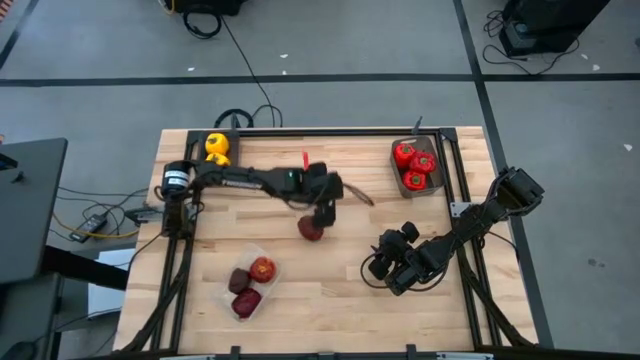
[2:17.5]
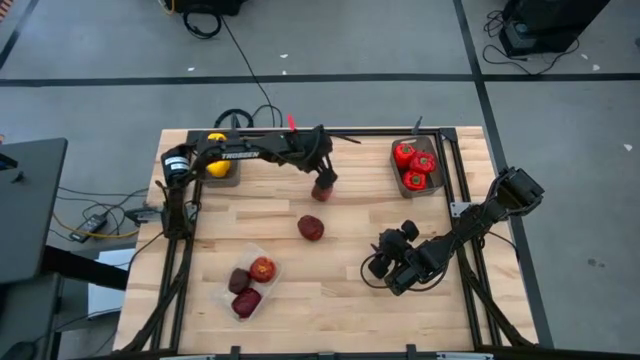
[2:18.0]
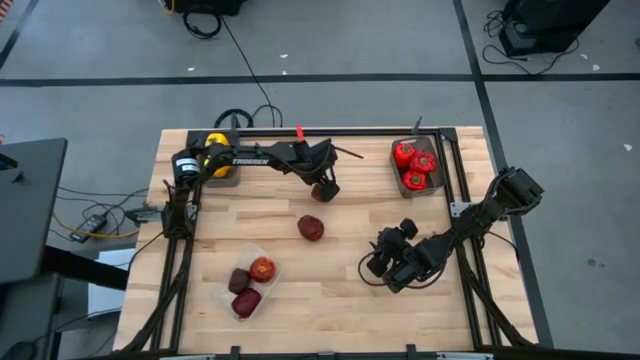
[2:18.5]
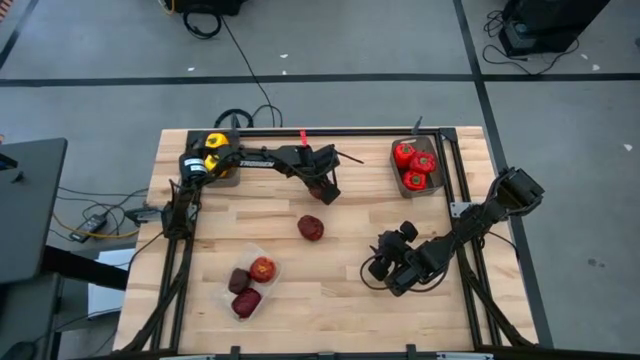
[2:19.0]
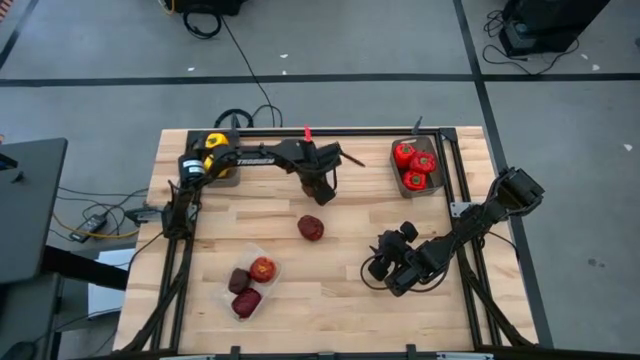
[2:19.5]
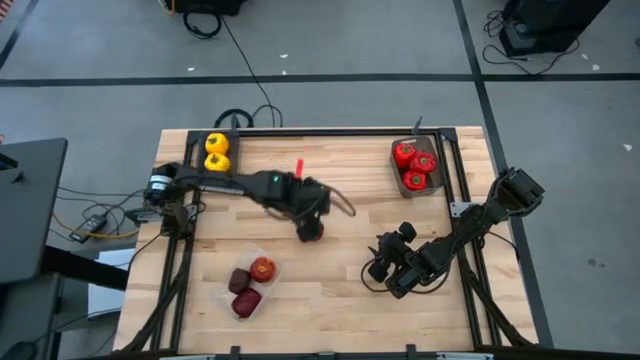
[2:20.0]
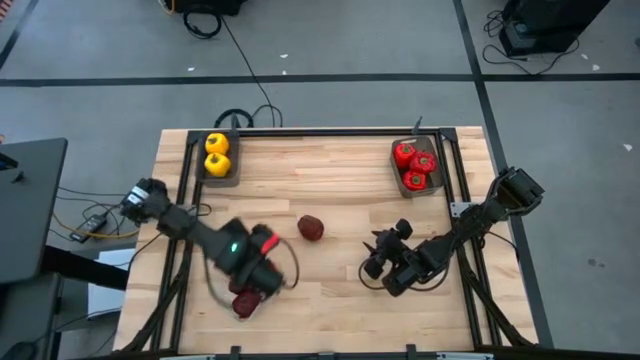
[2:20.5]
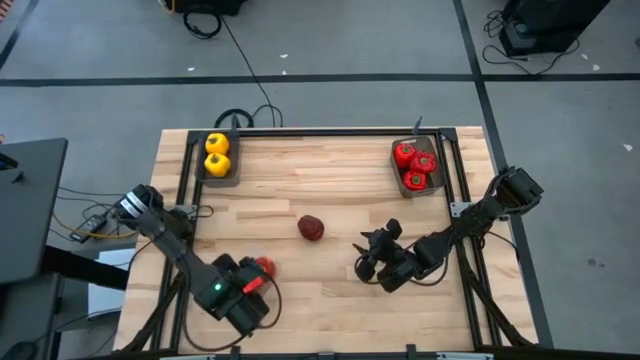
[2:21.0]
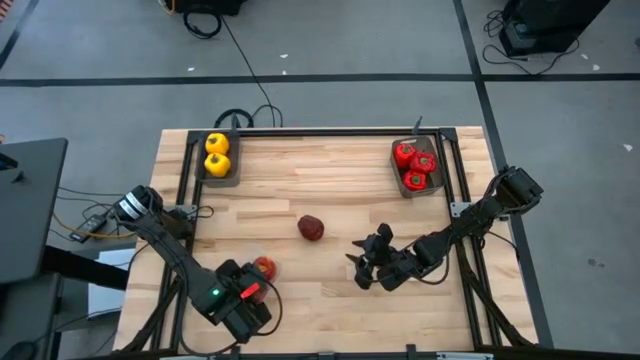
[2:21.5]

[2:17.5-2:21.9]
Task: Sort produce into baskets
Put the red apple into the transparent bin

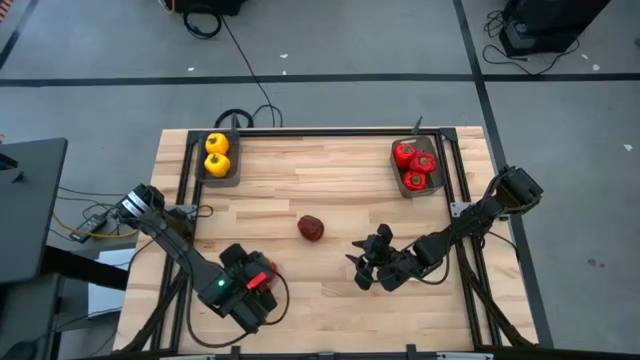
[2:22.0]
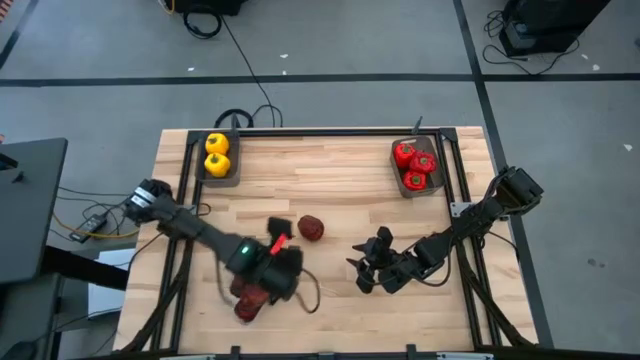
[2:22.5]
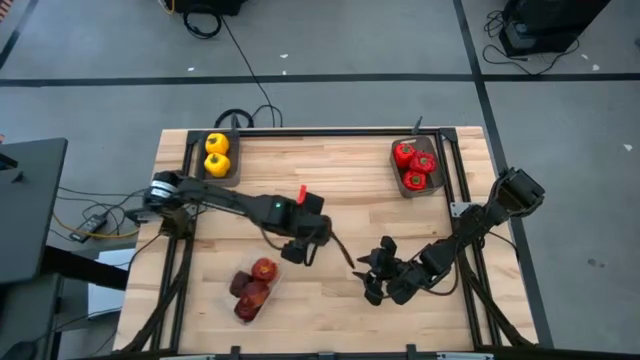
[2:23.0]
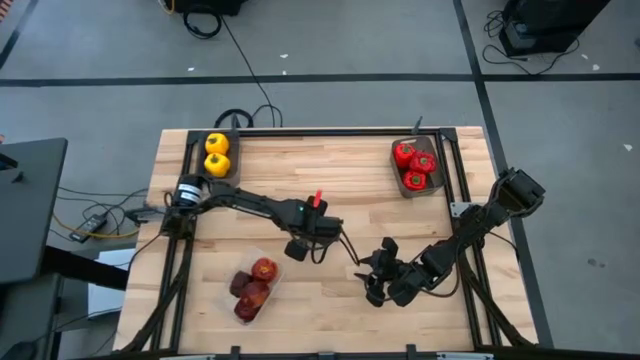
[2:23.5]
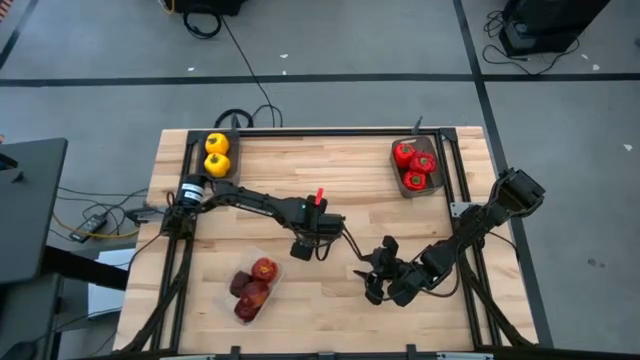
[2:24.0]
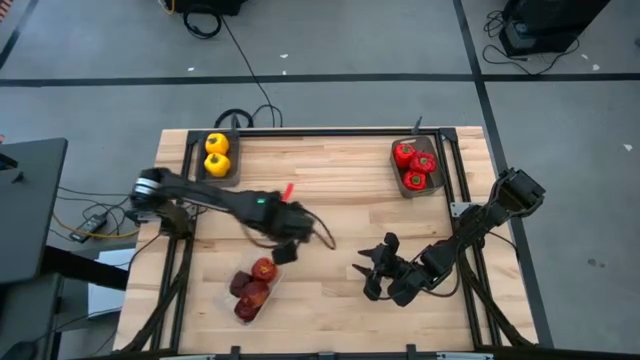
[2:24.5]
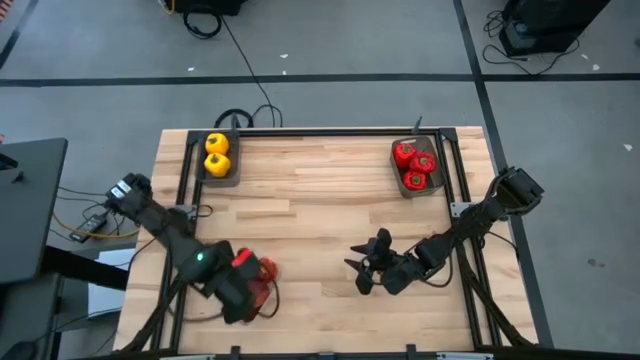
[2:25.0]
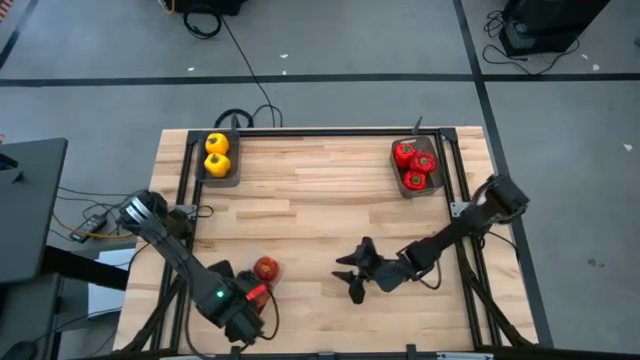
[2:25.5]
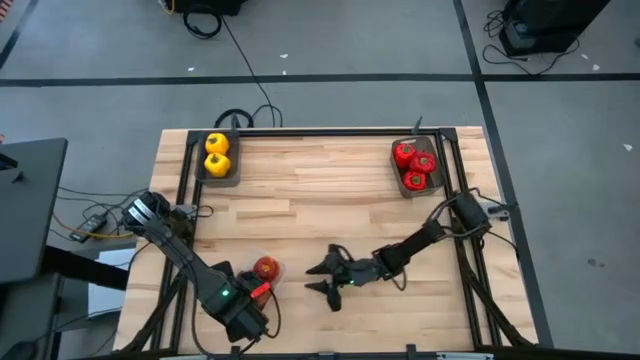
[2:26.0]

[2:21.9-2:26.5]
Put the red apple into the transparent bin

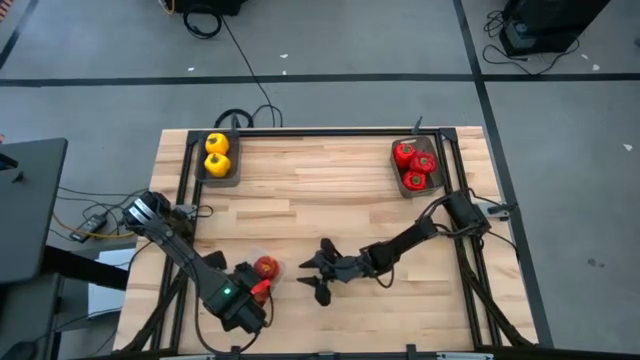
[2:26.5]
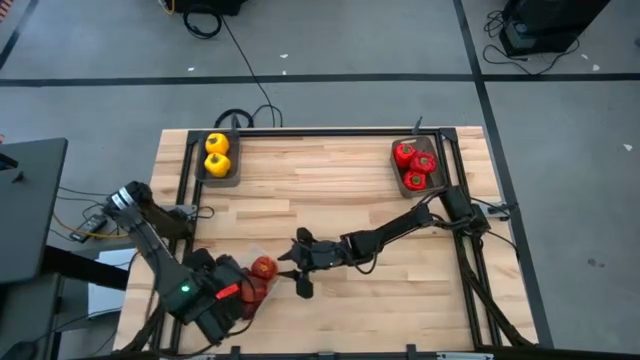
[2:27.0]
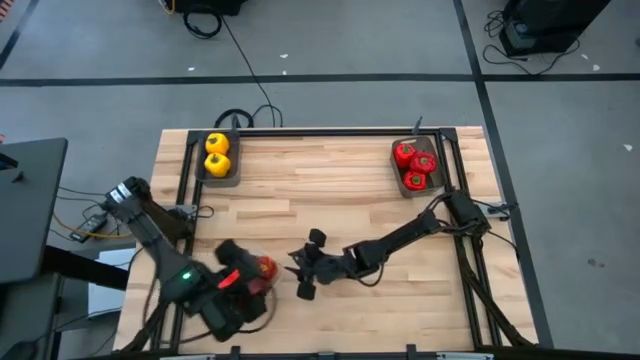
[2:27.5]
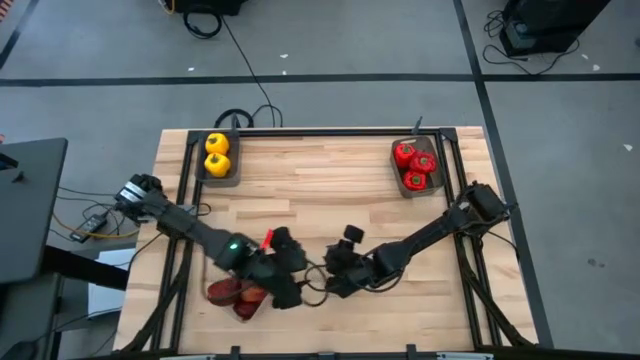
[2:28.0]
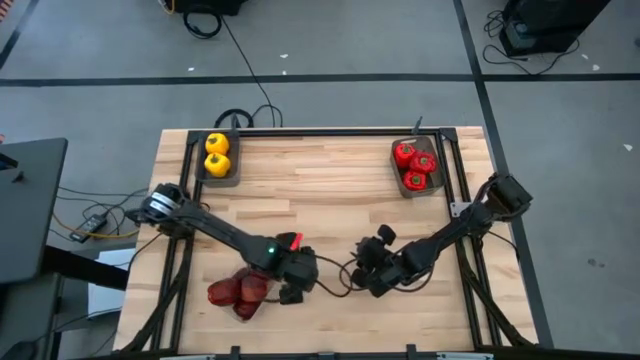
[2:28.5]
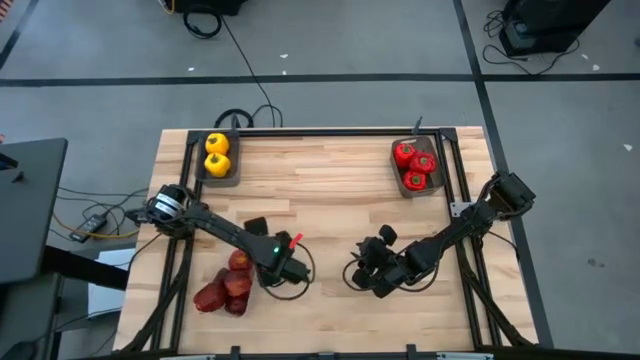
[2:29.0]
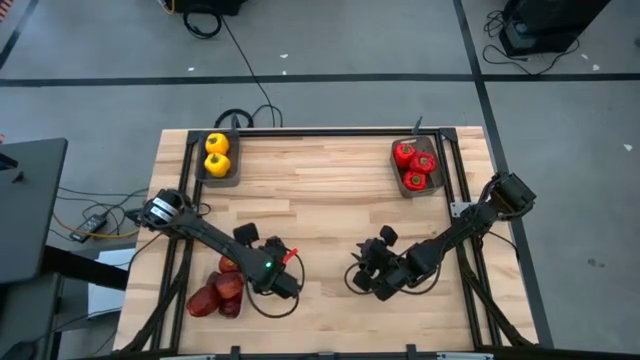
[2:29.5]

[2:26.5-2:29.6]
Adjust the transparent bin

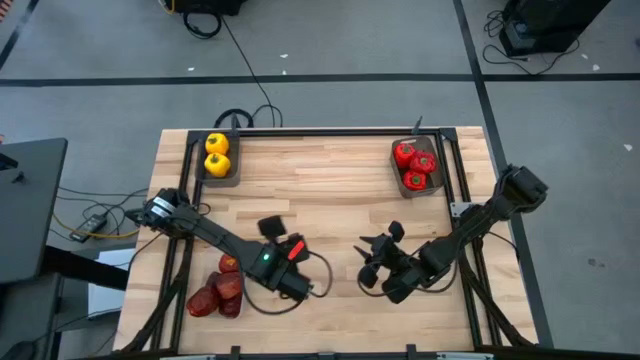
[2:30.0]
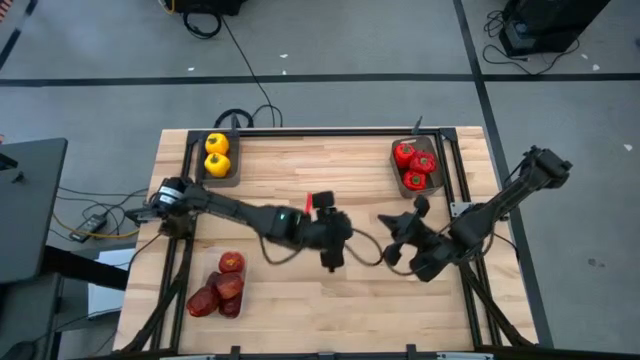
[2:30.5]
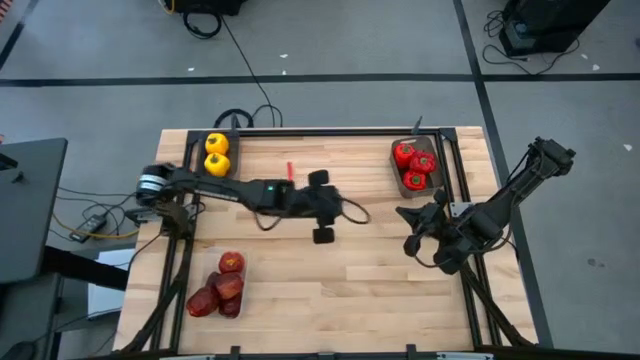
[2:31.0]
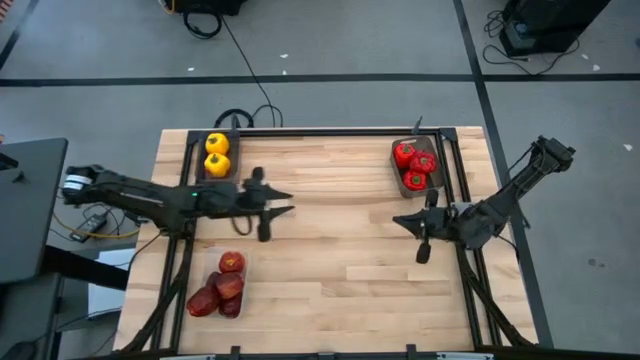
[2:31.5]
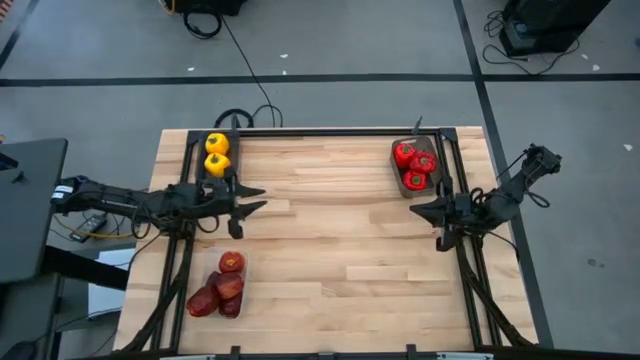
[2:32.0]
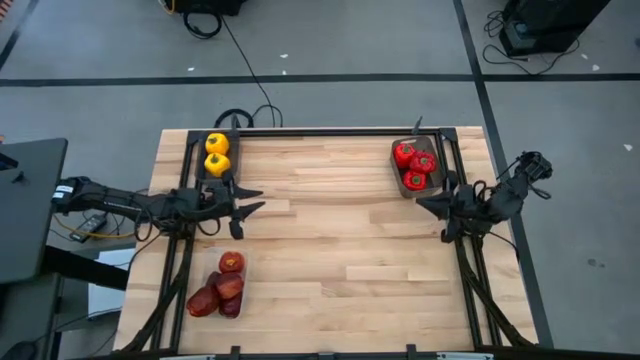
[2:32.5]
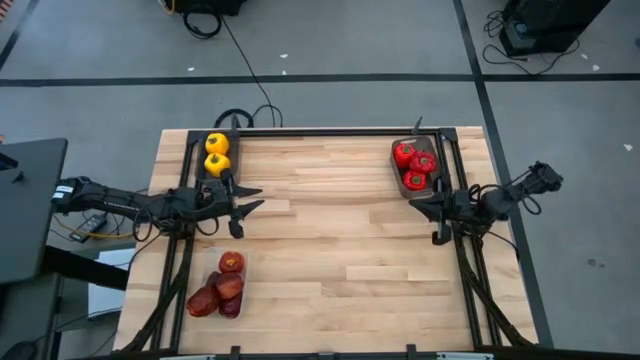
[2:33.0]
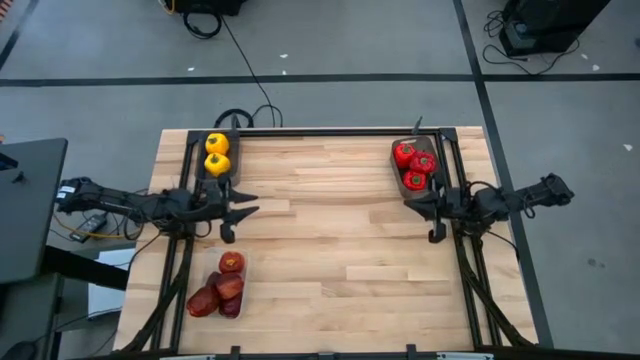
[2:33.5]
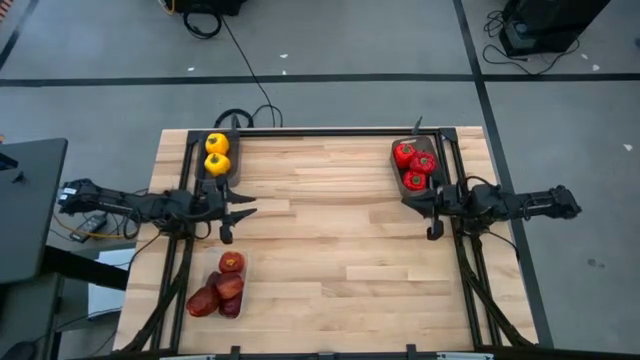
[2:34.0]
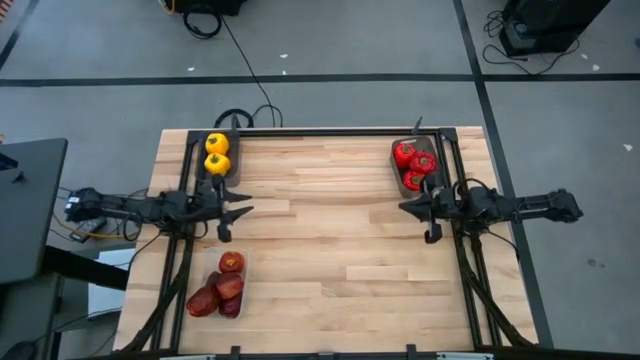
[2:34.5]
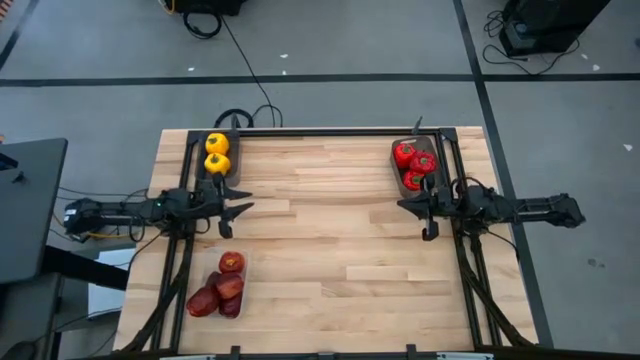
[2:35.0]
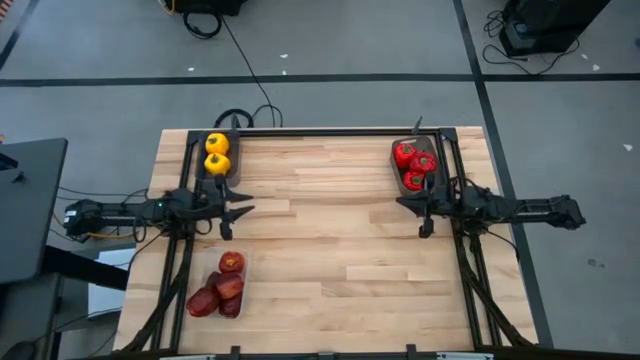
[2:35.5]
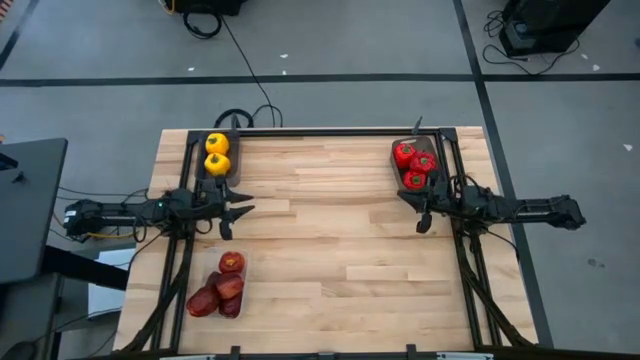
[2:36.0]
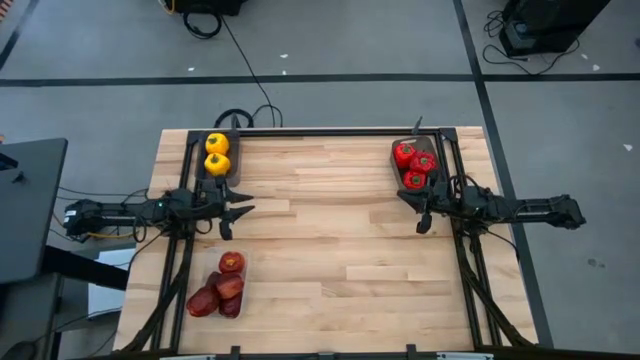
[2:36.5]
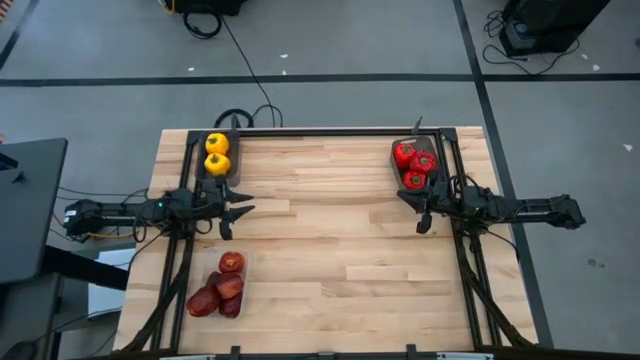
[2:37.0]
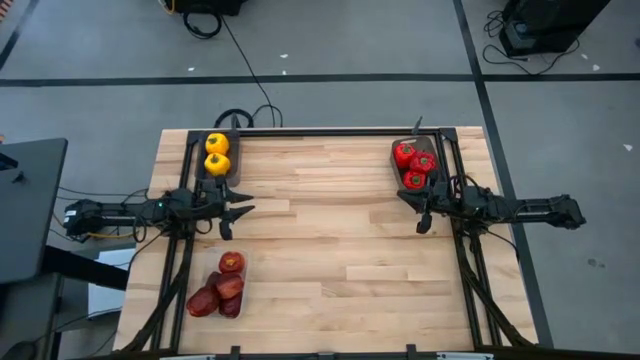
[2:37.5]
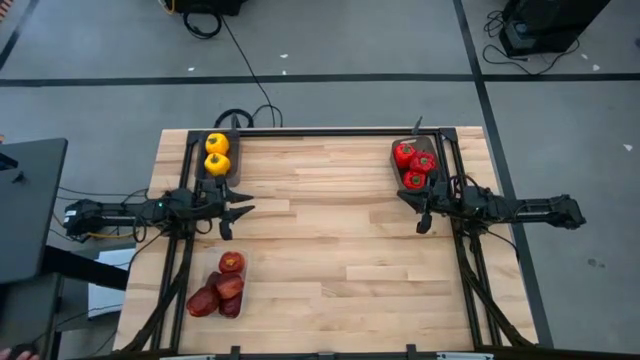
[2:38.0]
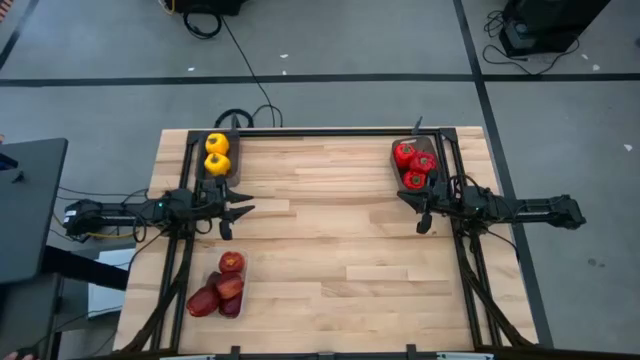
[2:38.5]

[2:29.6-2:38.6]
Return to Home Position
